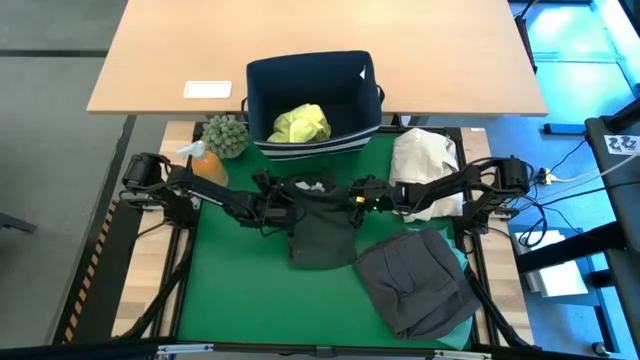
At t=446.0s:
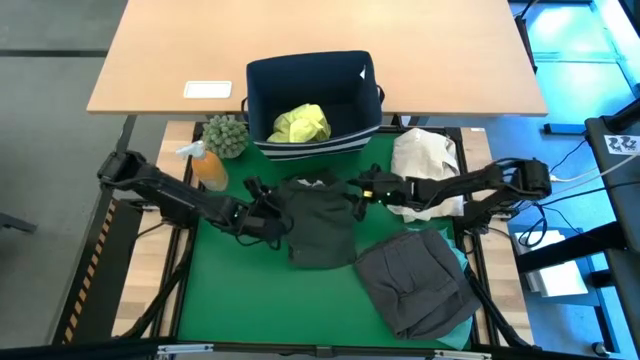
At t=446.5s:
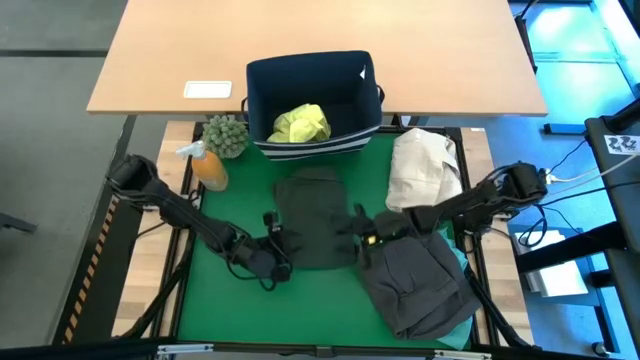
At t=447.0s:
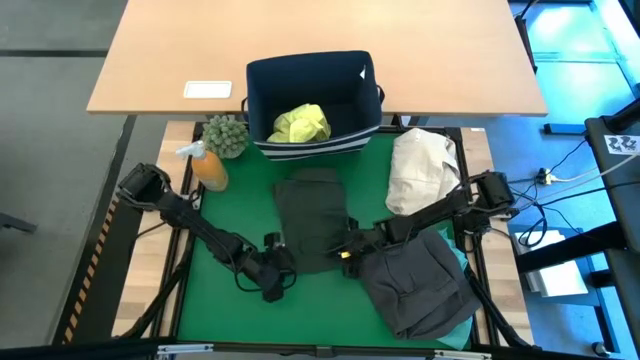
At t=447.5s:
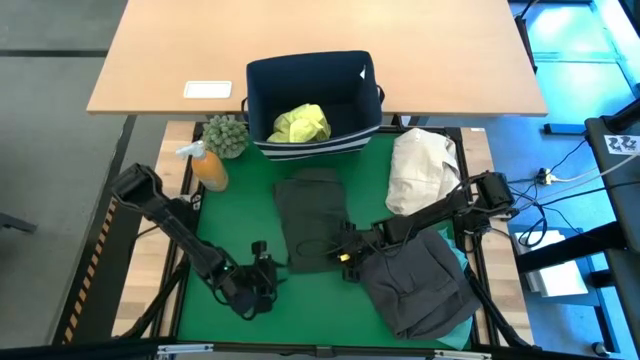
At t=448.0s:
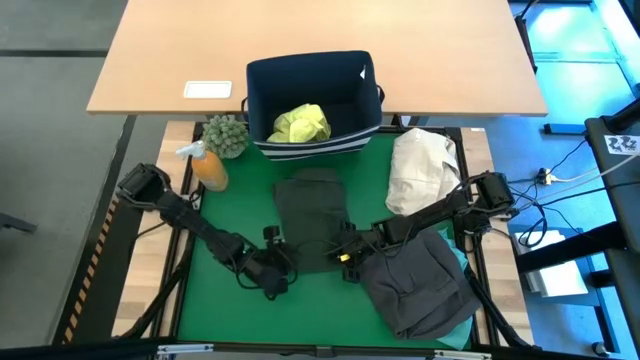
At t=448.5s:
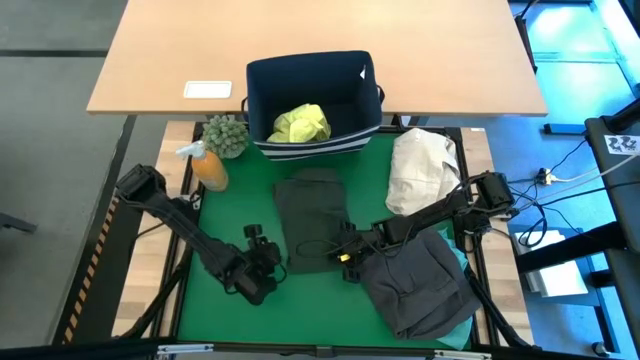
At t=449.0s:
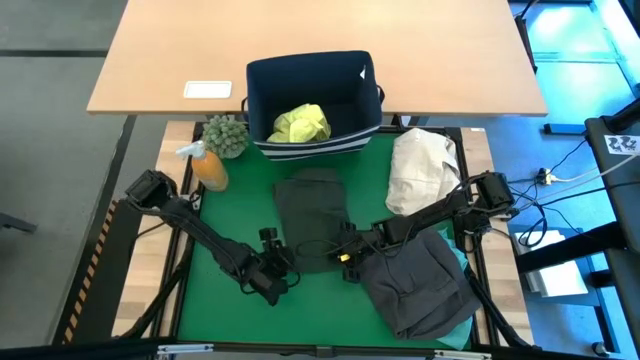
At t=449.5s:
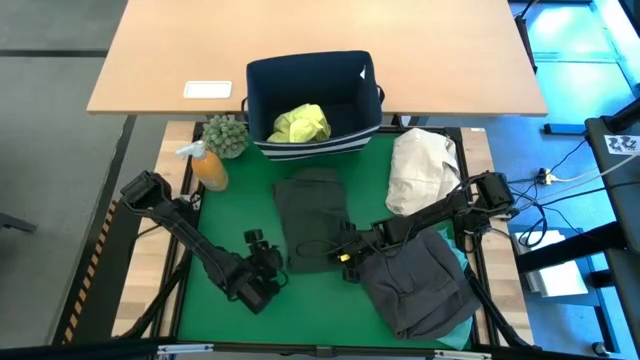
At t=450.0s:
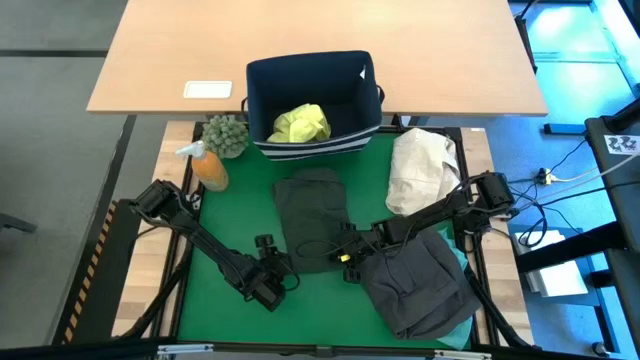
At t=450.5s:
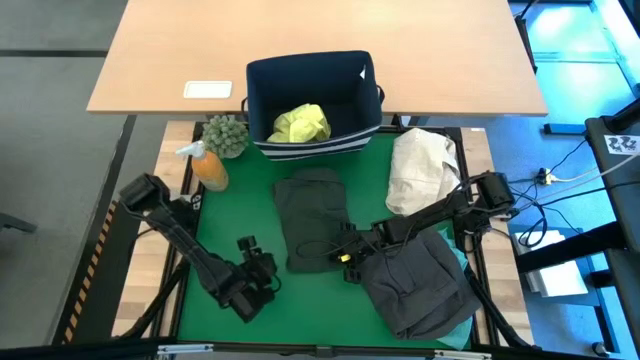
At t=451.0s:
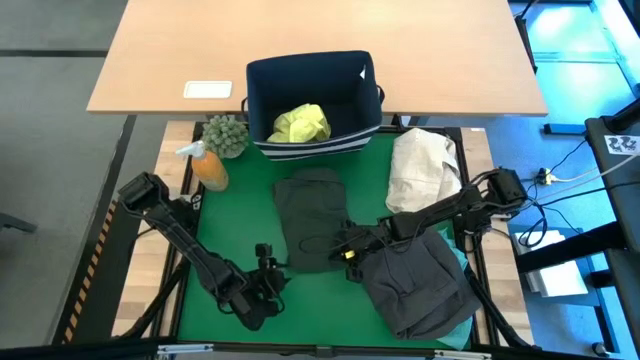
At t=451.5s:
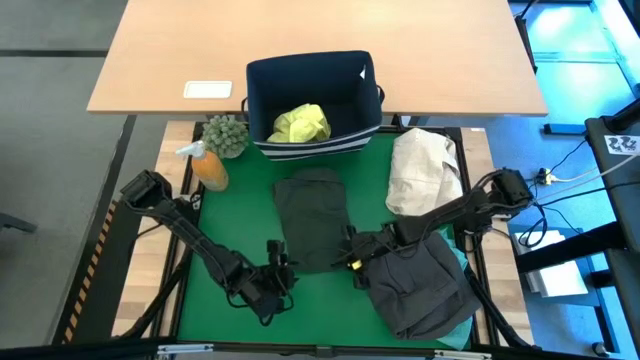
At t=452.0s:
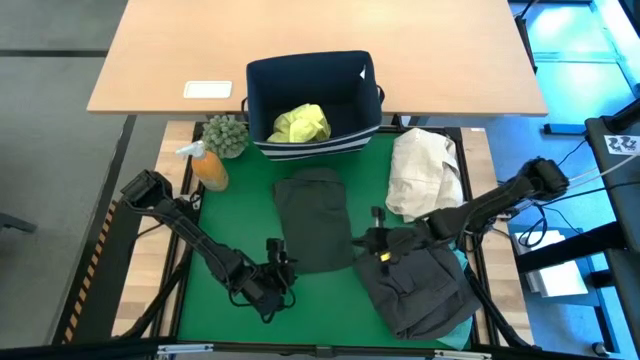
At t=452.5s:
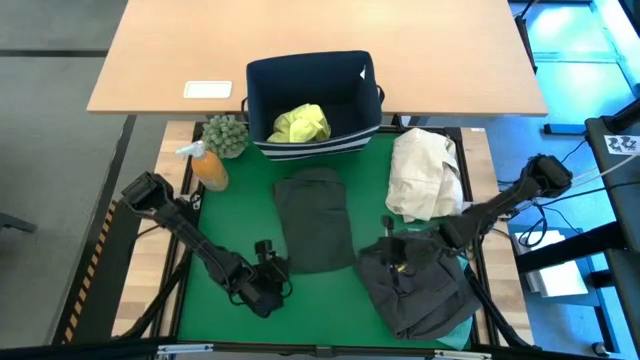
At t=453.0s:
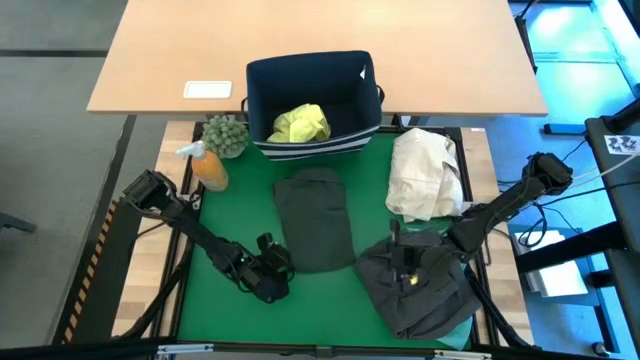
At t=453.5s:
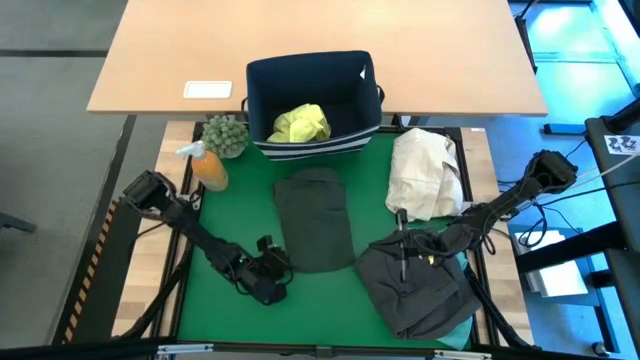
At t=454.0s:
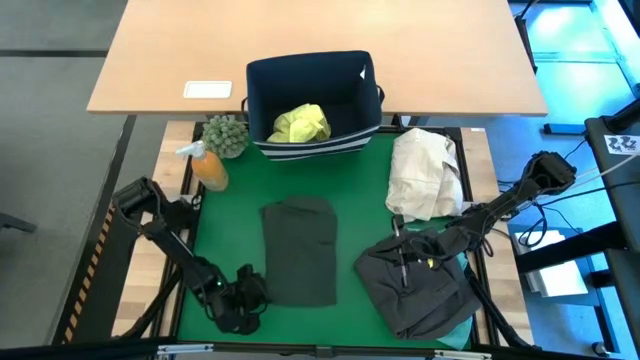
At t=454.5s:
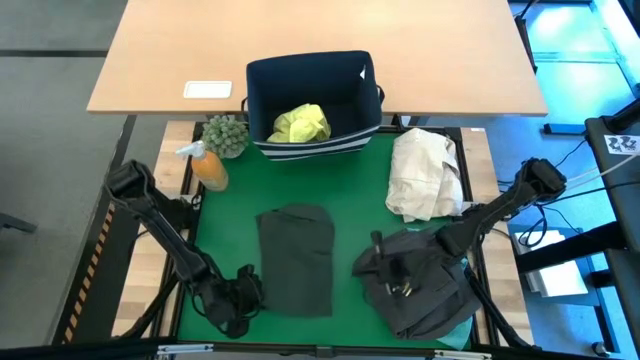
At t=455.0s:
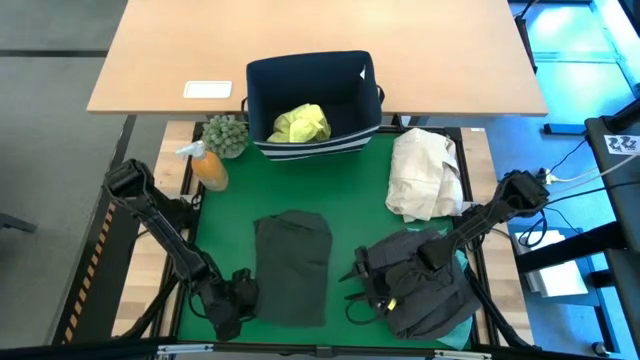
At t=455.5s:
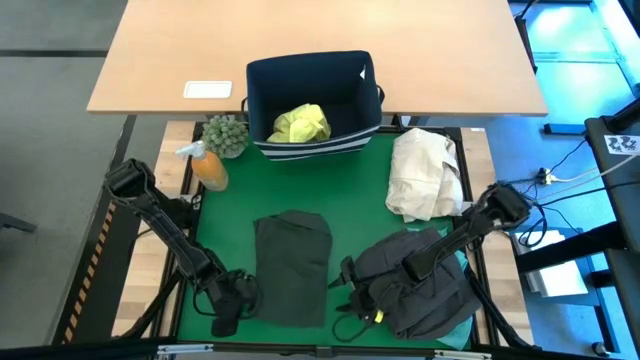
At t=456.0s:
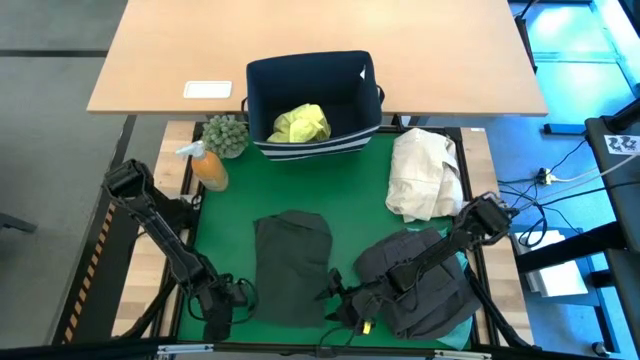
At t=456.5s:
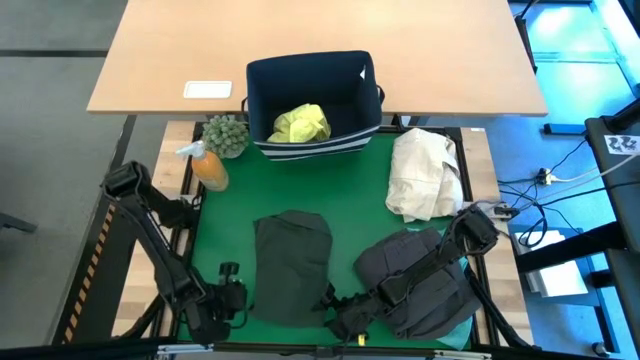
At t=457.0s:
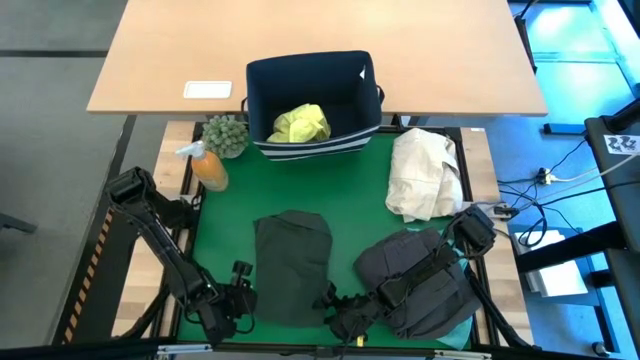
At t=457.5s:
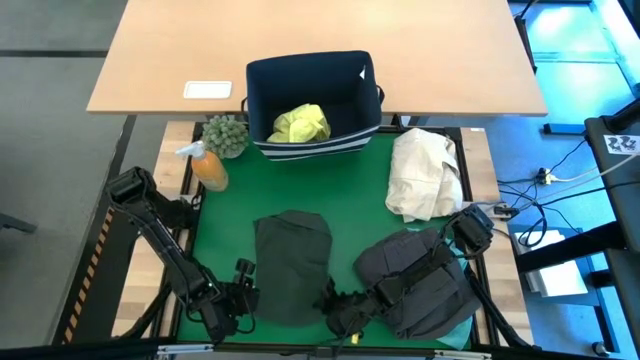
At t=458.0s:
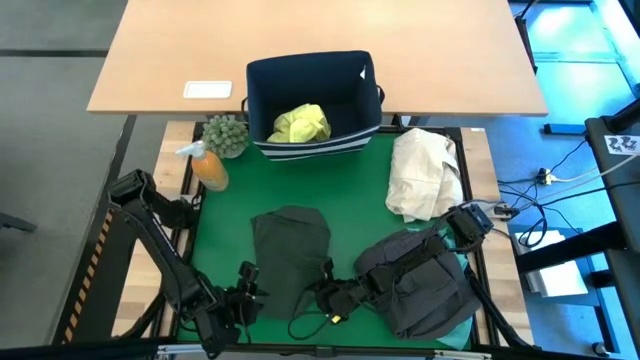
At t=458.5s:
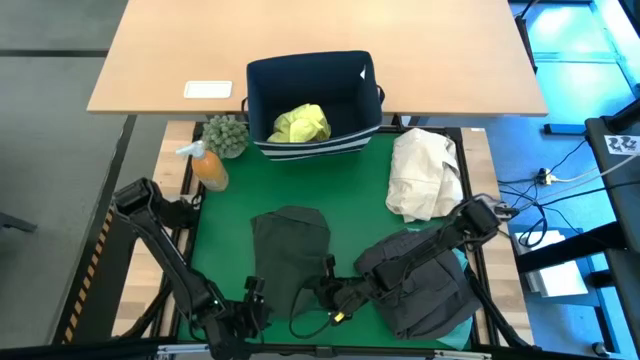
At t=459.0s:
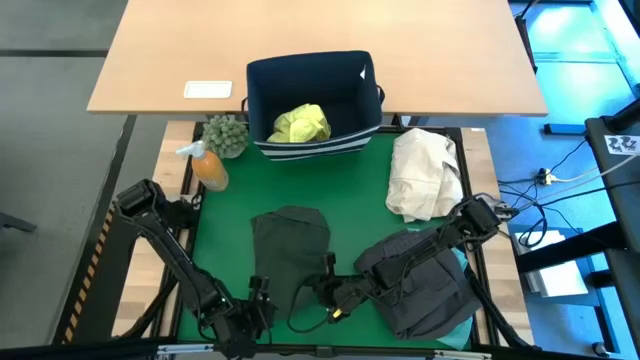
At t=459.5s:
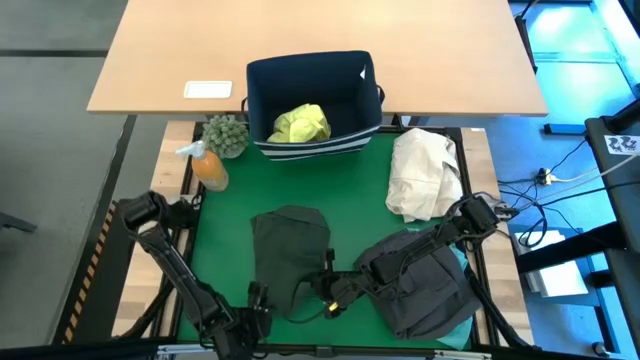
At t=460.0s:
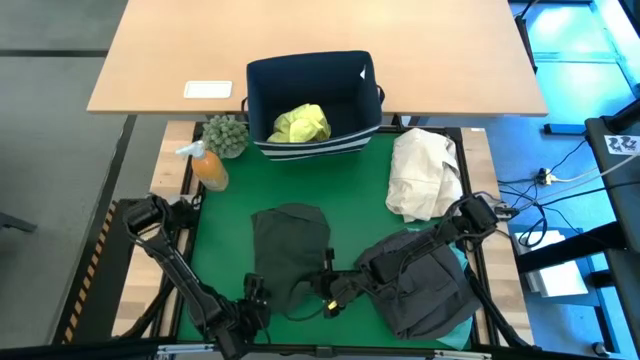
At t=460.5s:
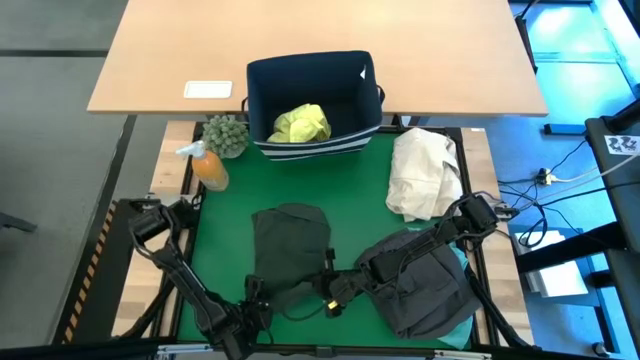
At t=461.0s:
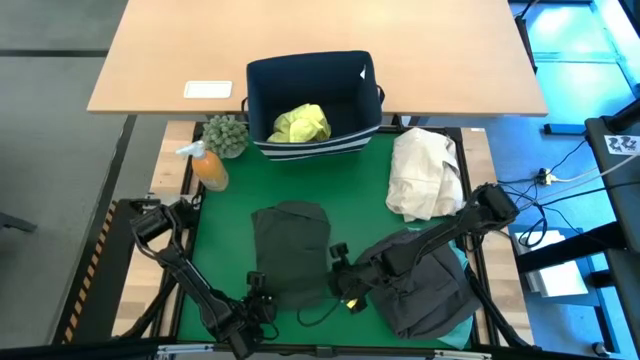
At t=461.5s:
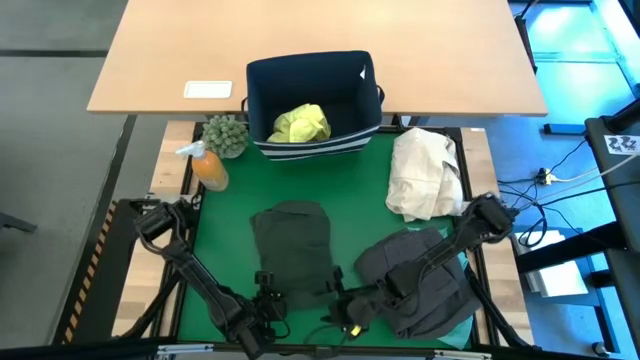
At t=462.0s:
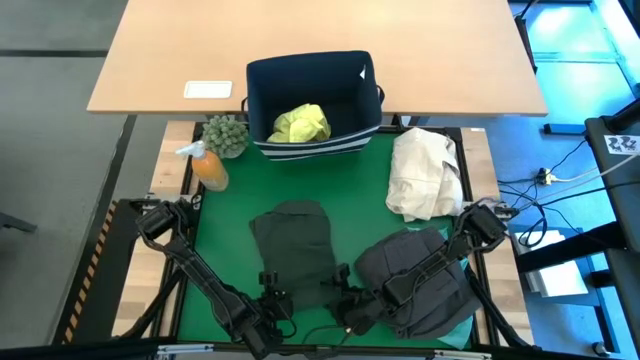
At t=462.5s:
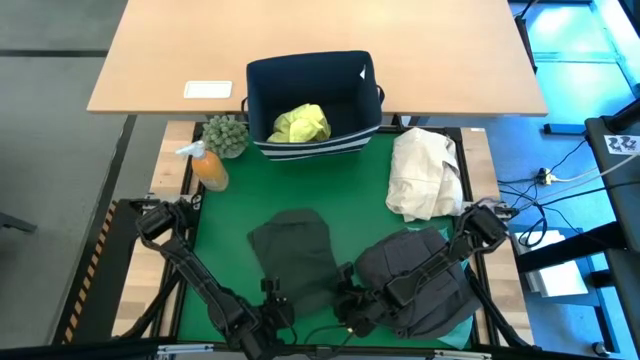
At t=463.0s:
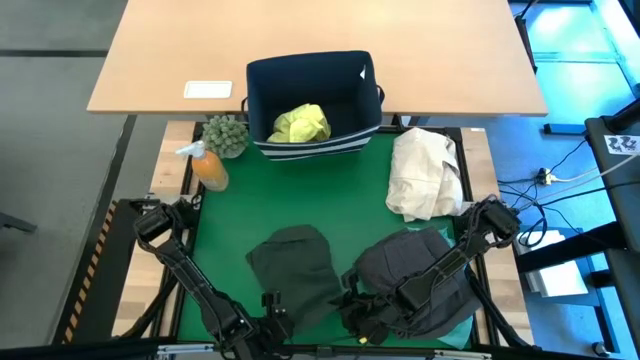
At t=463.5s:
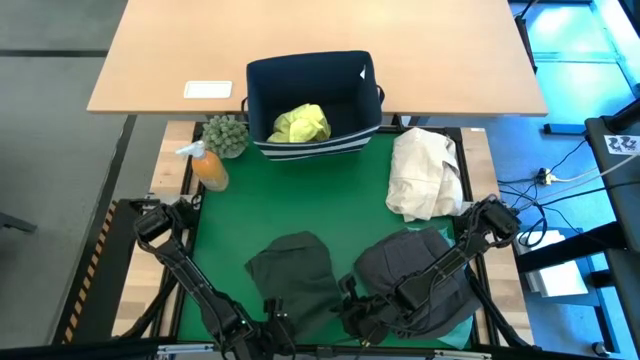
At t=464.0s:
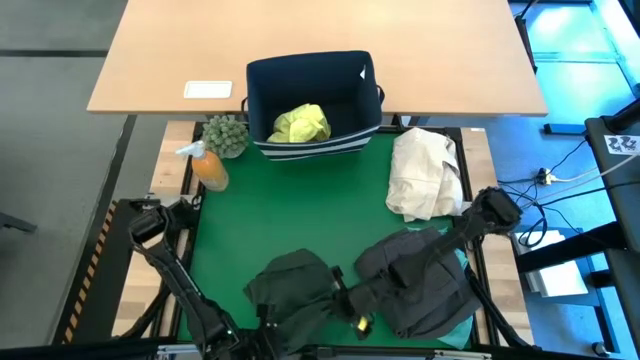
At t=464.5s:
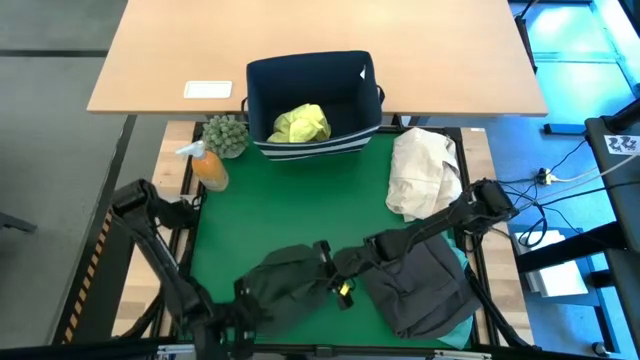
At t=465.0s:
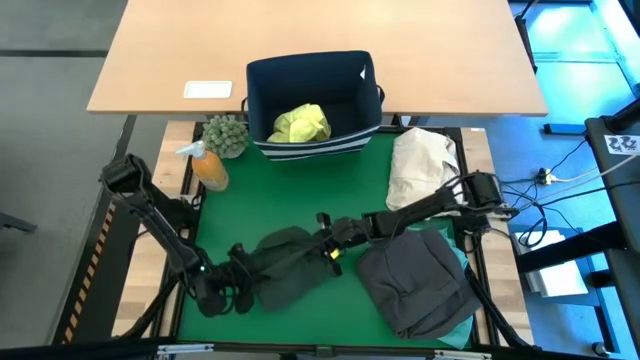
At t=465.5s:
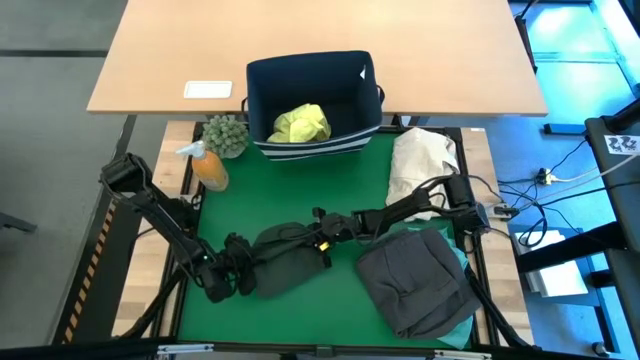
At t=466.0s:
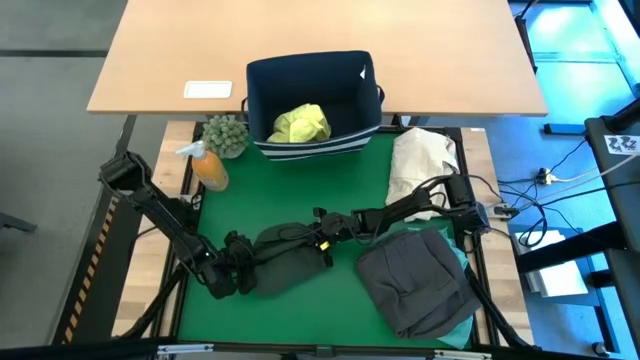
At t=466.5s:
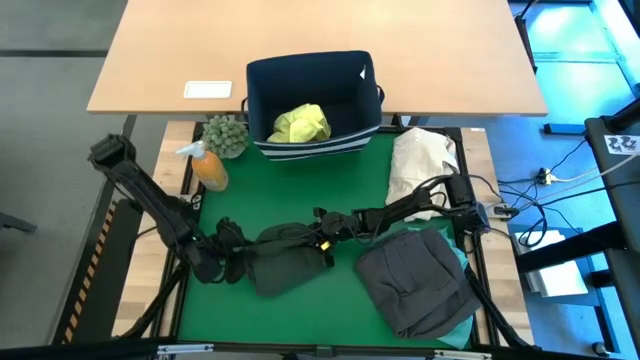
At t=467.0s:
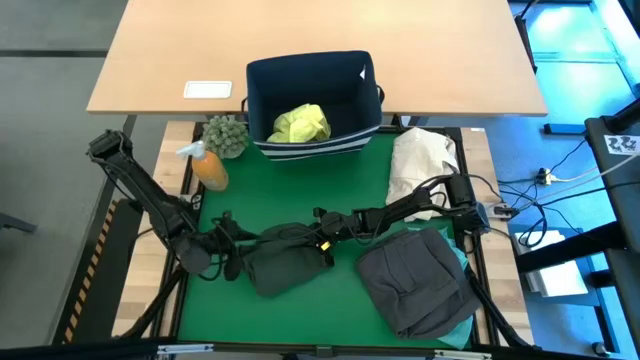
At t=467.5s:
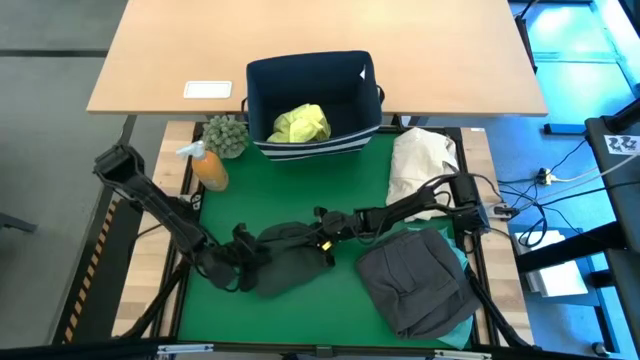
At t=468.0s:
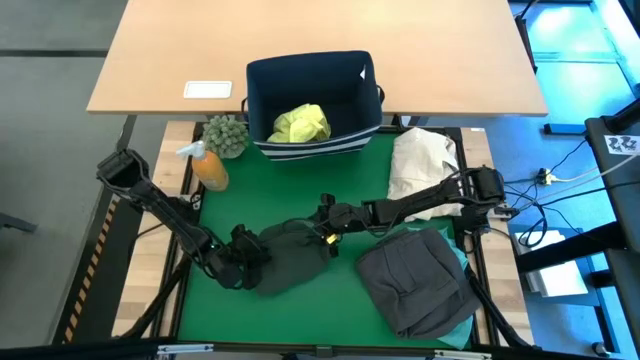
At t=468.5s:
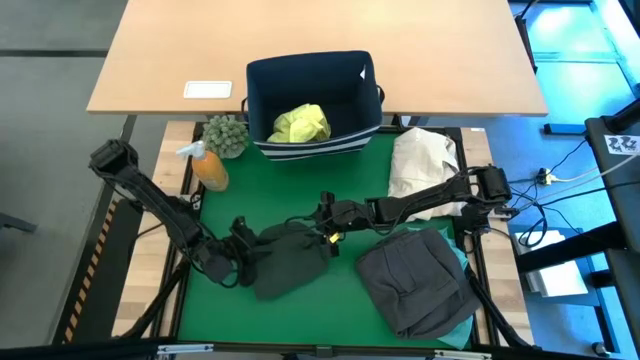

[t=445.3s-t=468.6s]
Task: Fold laundry
Fold the green polo shirt
